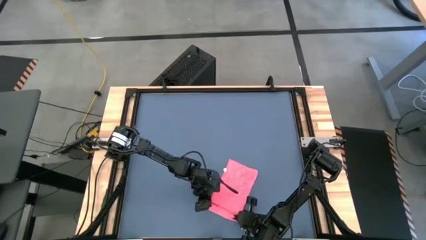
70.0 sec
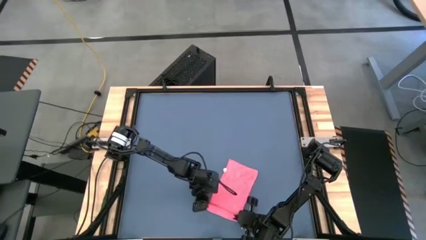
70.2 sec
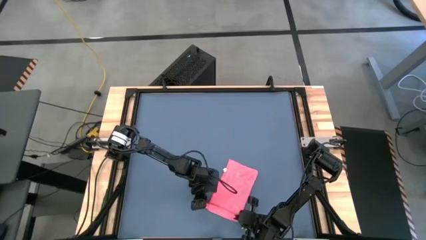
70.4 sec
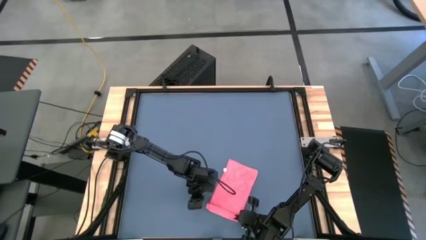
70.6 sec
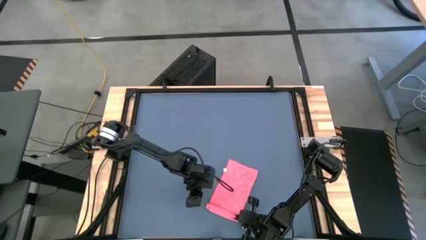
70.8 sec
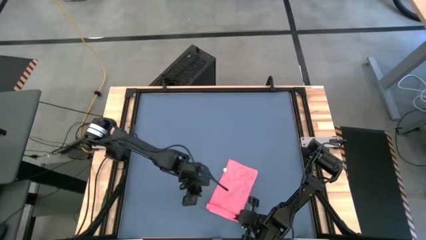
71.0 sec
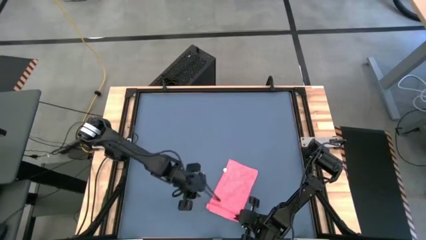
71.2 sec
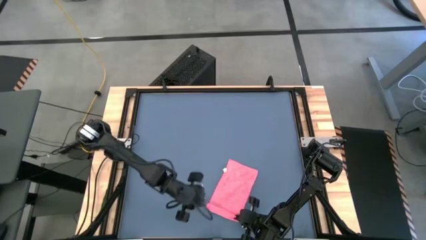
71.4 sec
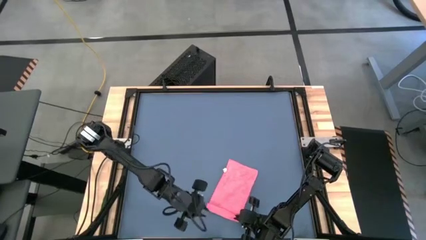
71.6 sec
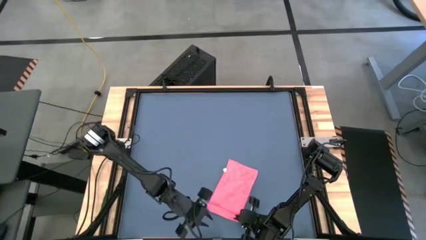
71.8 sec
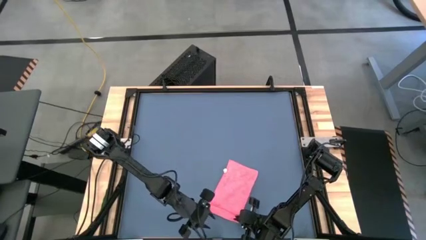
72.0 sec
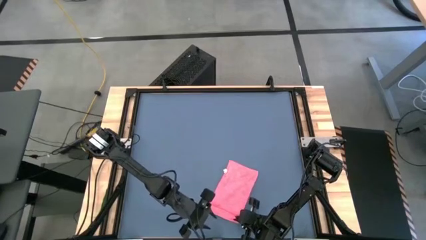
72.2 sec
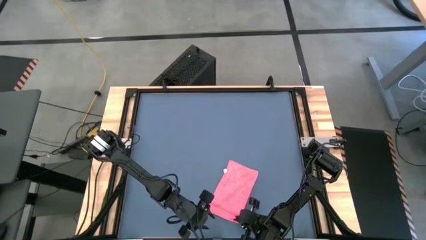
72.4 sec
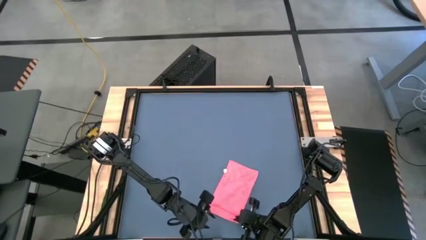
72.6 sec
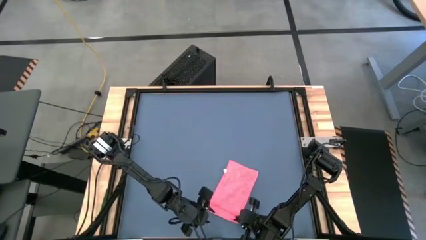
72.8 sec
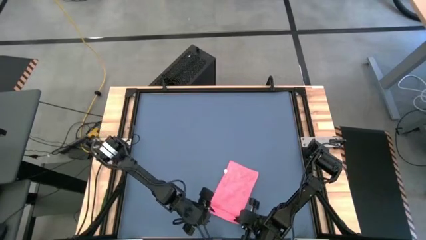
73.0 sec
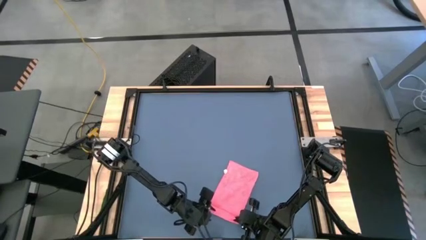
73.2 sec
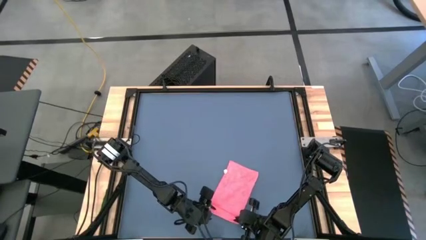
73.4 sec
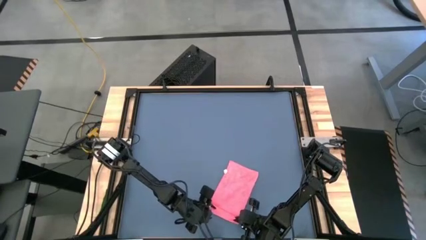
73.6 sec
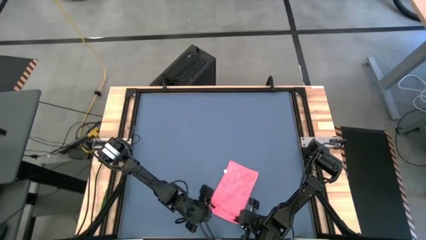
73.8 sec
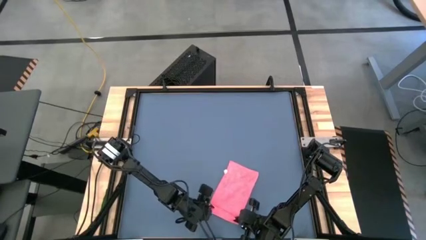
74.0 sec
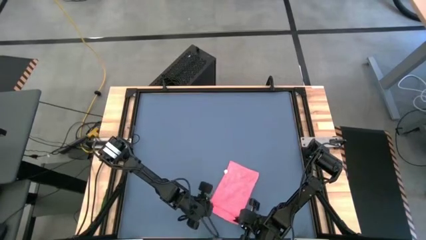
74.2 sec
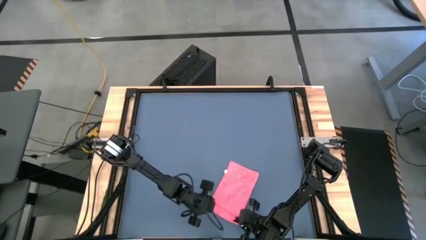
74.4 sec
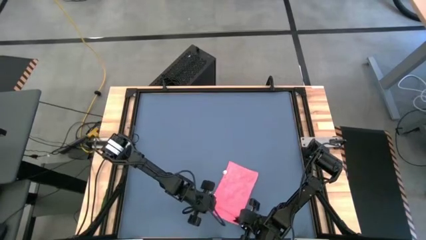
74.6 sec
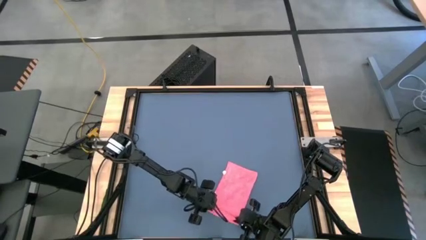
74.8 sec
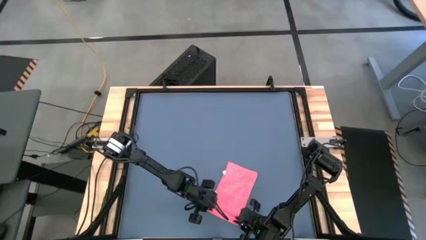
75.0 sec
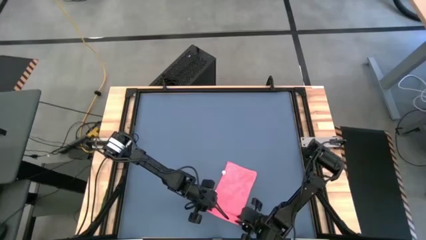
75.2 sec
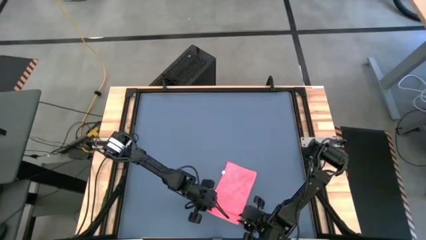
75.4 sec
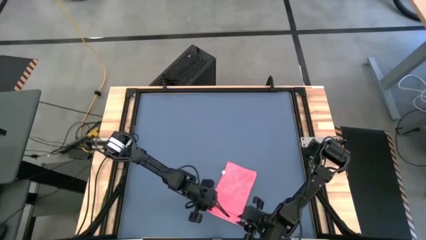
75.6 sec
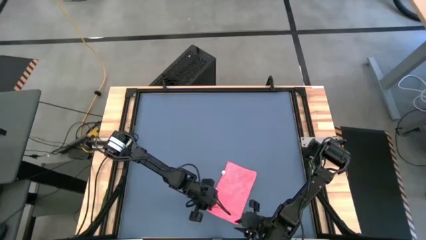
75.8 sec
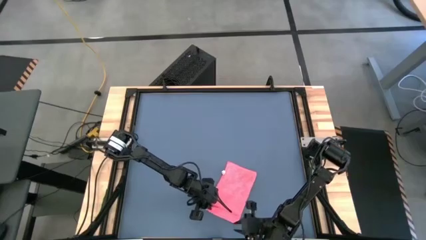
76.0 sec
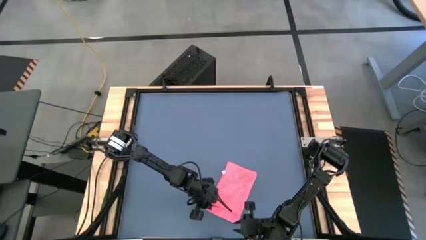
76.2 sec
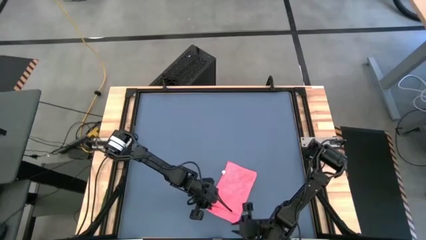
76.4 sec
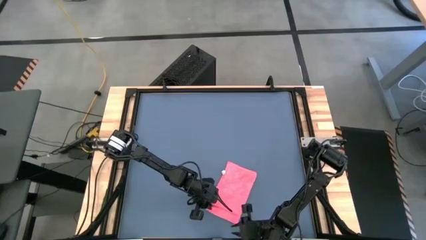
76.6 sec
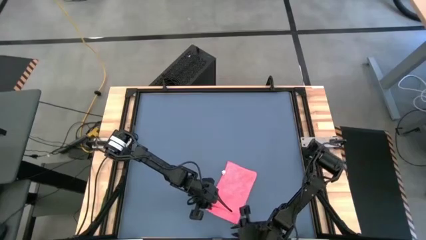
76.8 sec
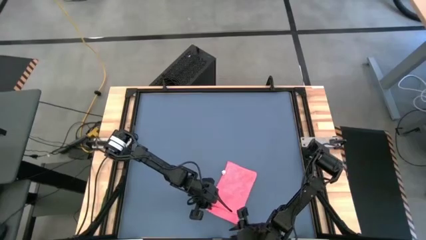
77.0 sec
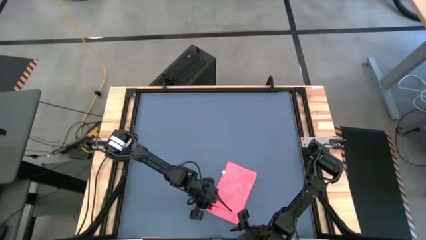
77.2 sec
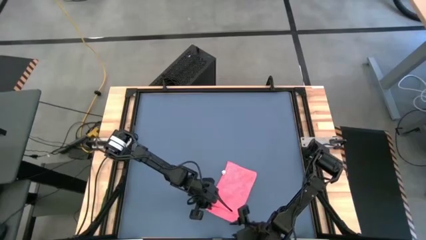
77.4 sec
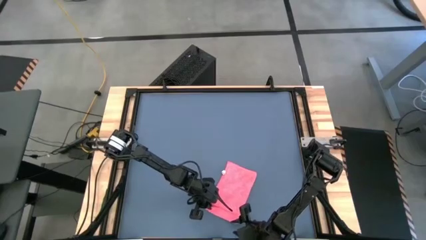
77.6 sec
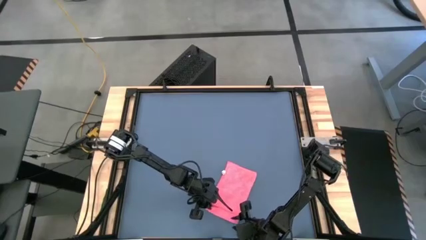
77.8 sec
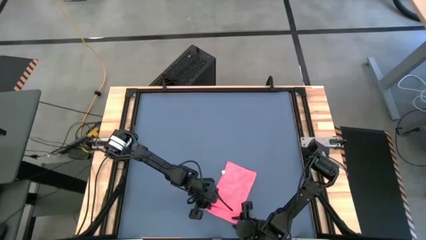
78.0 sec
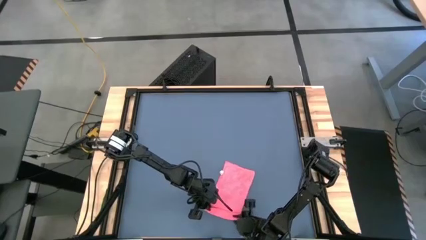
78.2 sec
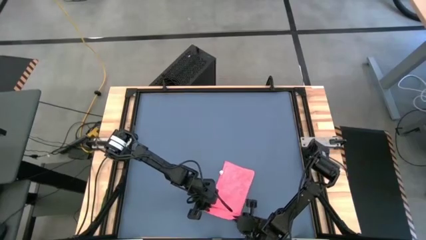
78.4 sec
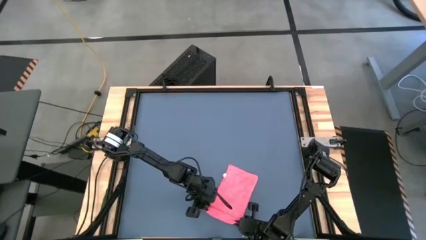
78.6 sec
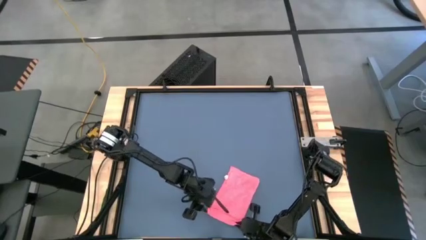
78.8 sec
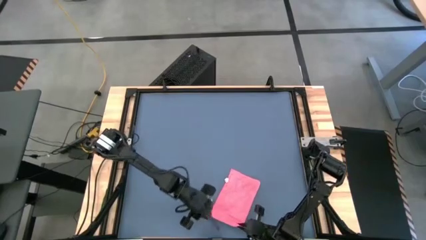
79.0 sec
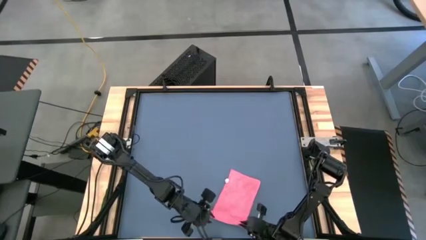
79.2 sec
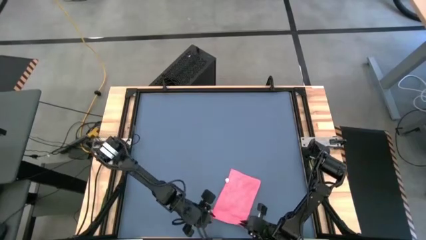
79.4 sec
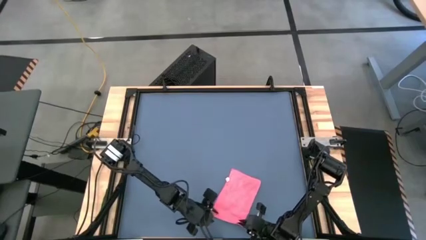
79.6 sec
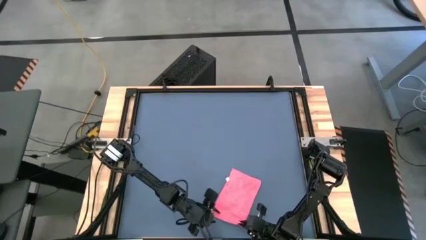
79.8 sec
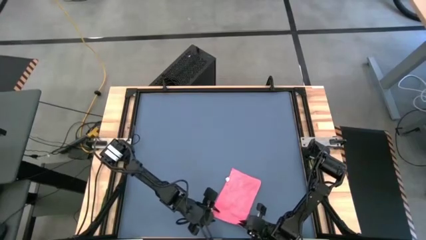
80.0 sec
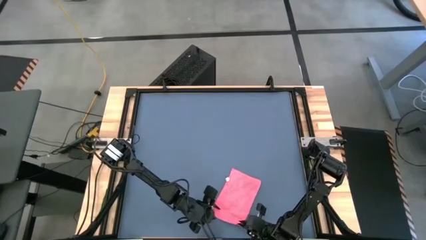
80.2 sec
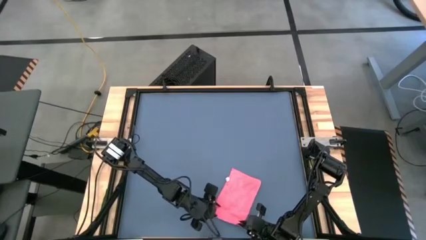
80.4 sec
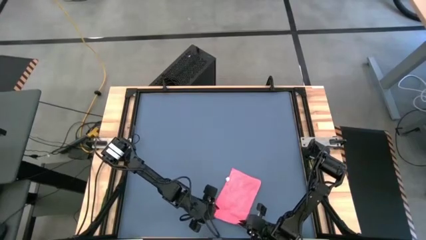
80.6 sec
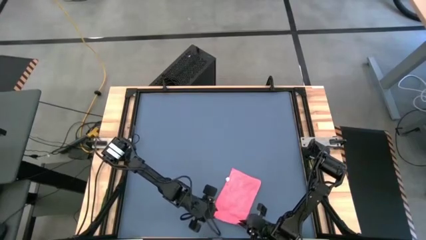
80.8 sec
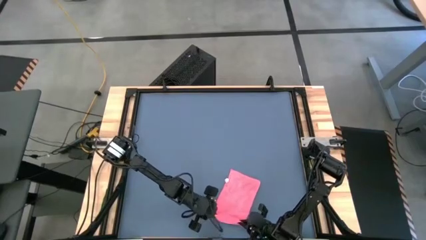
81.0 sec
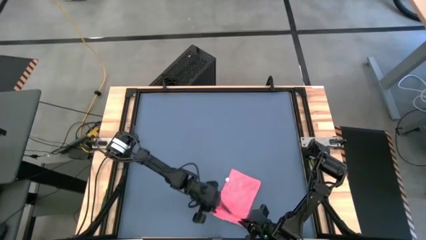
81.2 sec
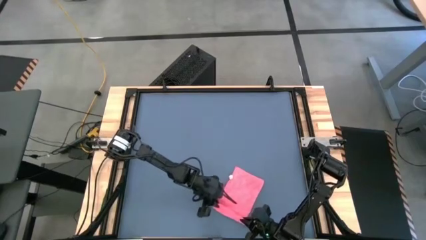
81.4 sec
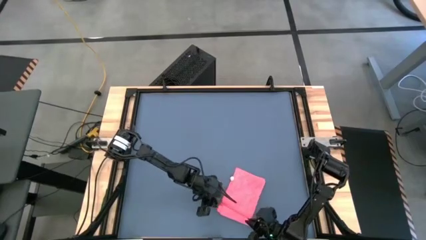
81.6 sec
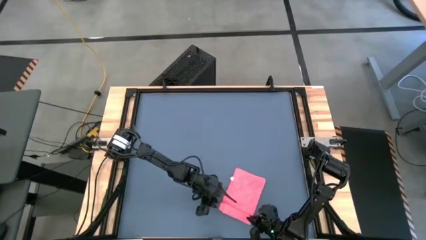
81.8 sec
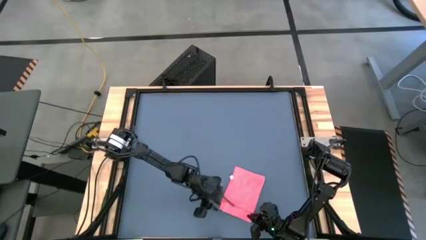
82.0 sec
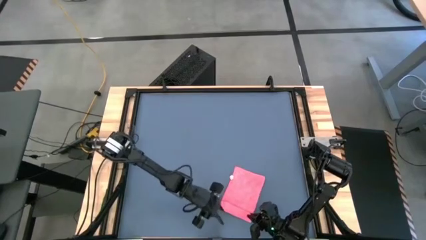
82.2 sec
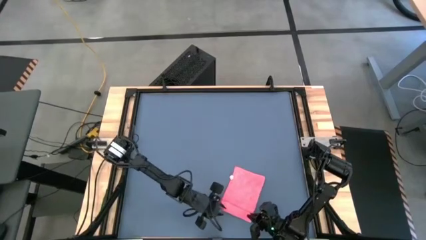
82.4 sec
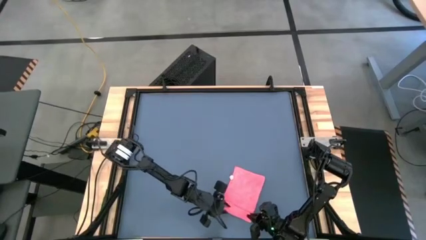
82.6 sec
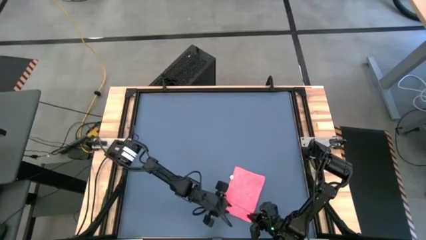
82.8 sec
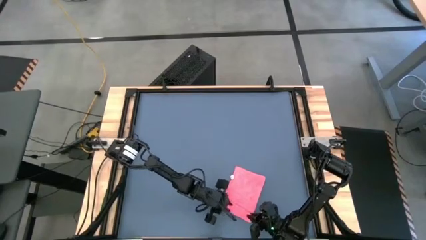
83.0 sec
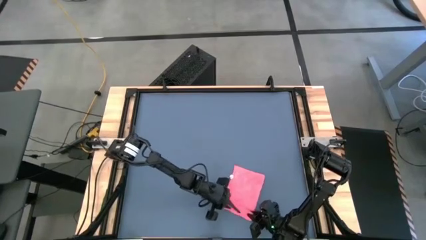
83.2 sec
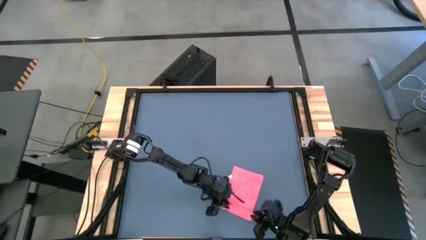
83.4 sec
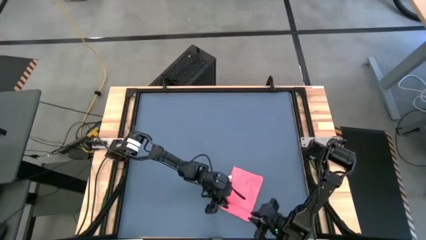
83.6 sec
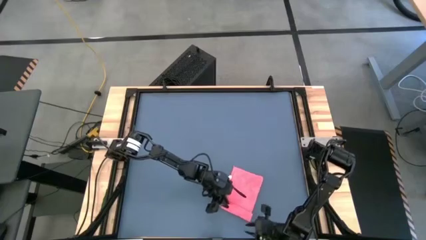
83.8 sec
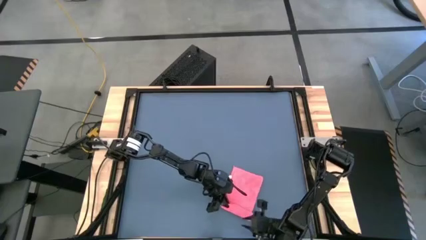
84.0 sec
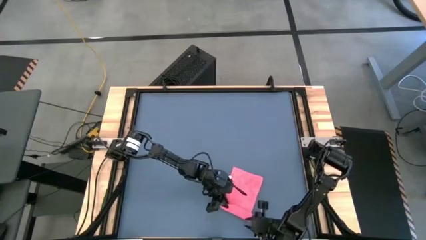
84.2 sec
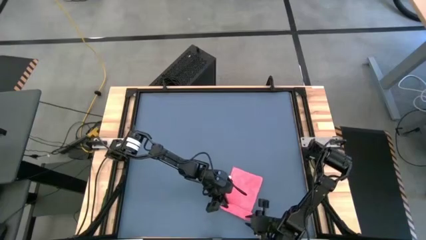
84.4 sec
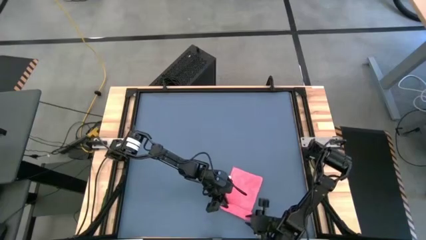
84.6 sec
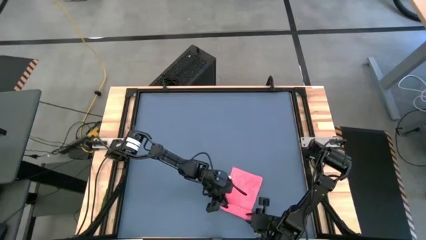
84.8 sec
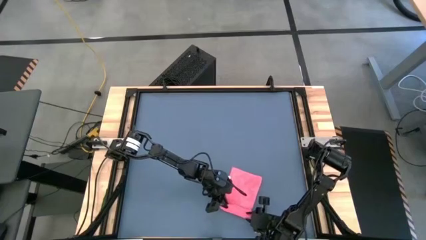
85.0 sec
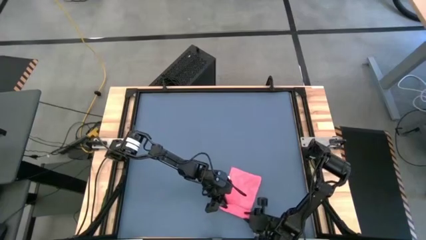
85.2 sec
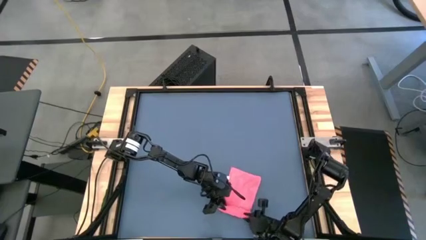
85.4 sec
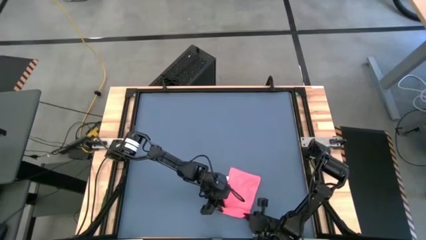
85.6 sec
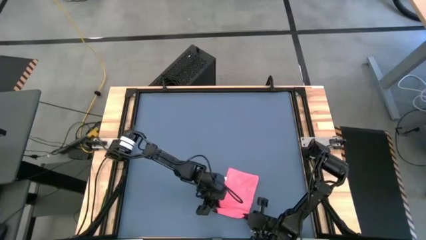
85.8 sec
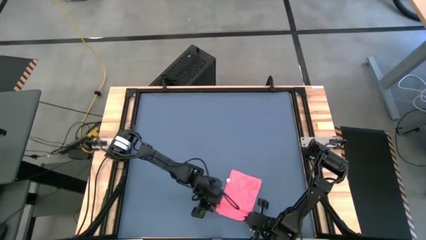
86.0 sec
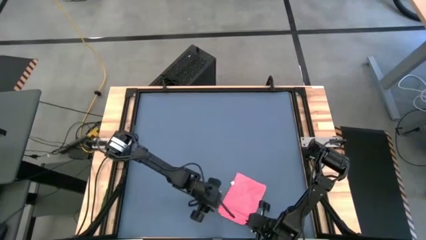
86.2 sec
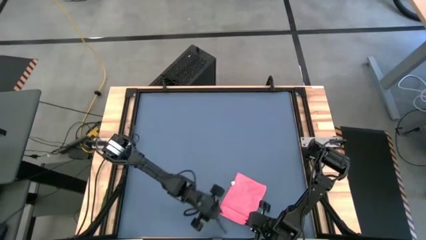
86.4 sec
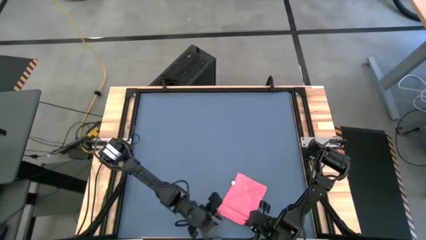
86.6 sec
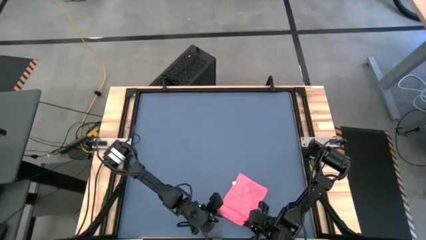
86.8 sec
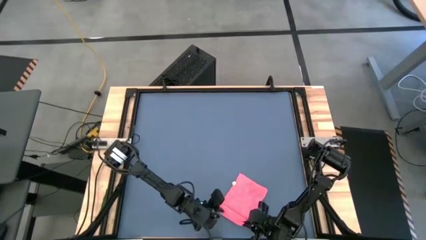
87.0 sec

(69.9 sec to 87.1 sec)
Task: Roll towel
Roll the microfiber towel
